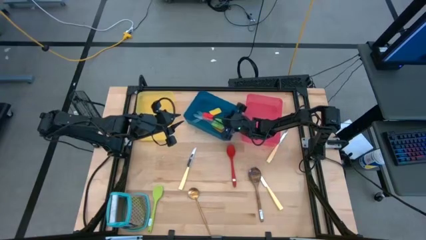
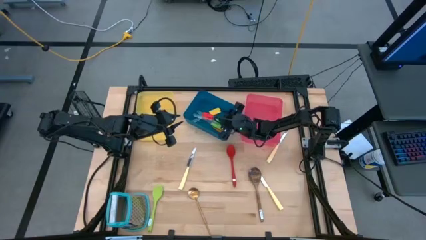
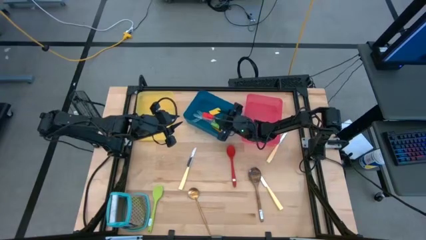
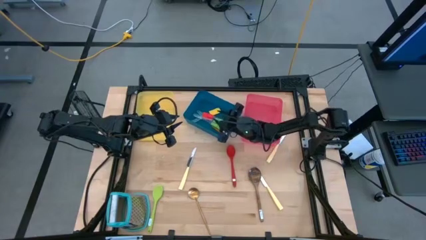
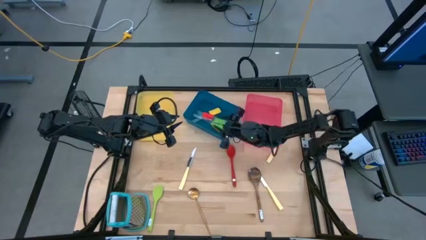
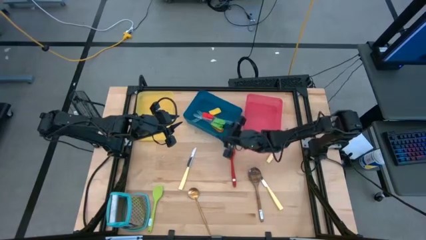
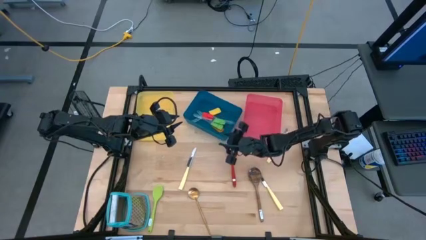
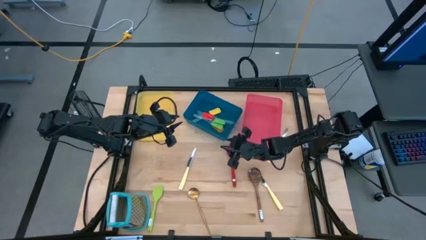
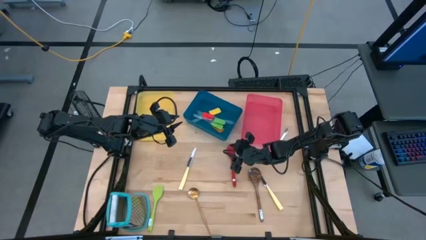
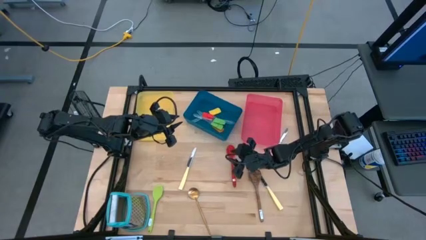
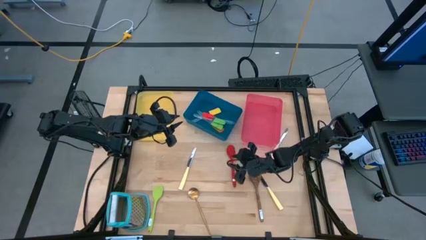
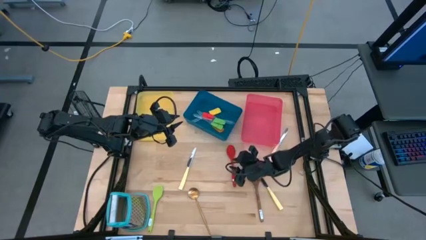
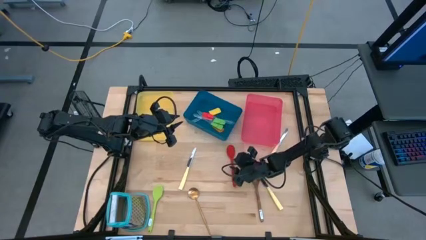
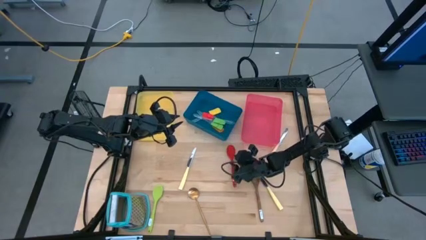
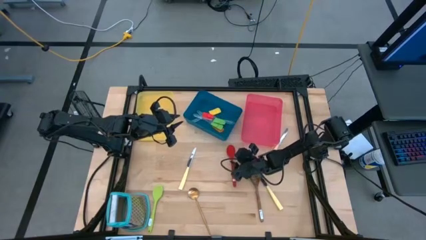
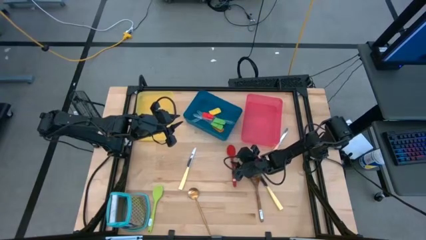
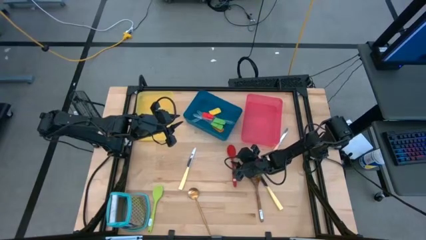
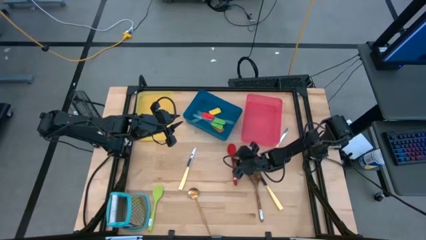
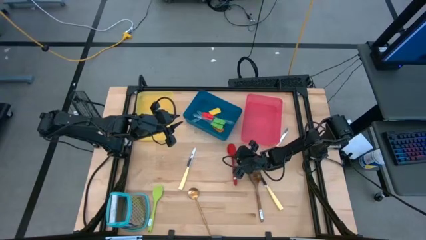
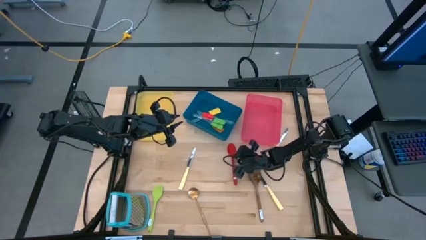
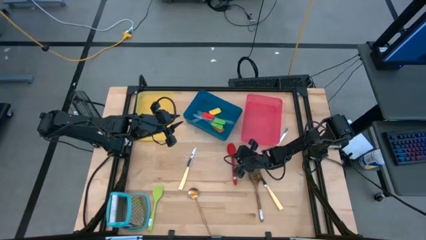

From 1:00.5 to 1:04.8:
Task: Pick & Place Kitchen Items
Put the red serving spoon into the pink bin

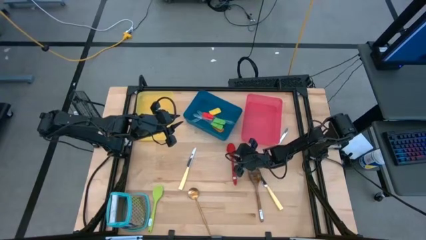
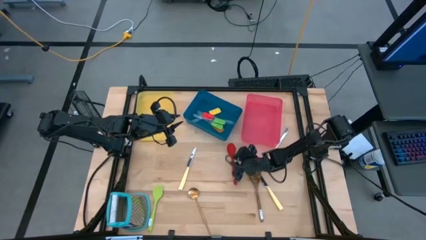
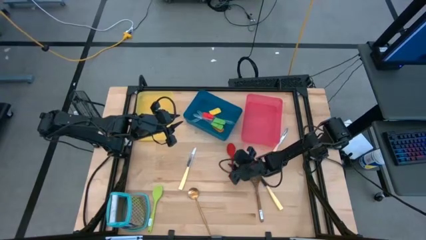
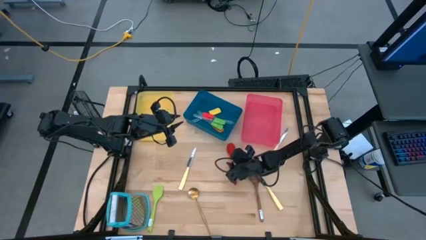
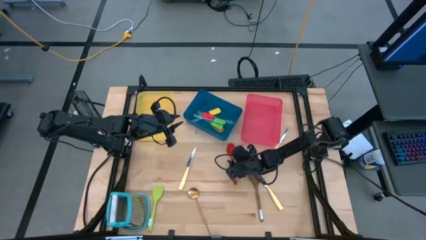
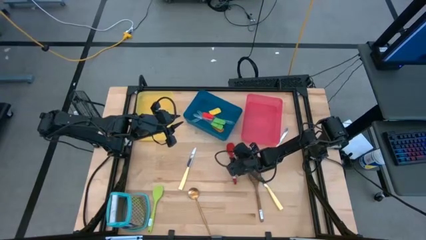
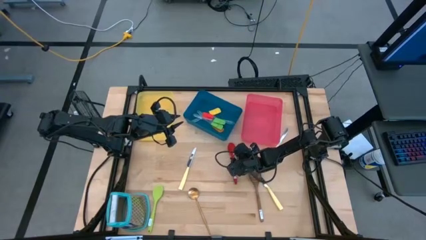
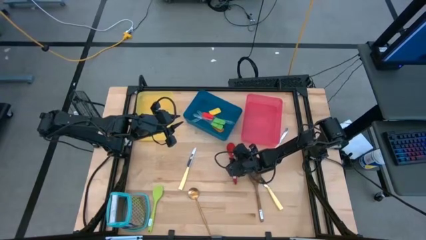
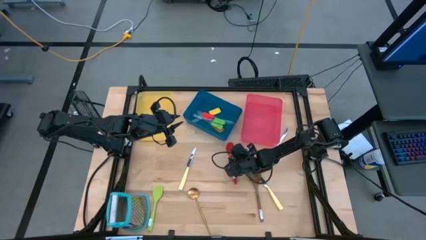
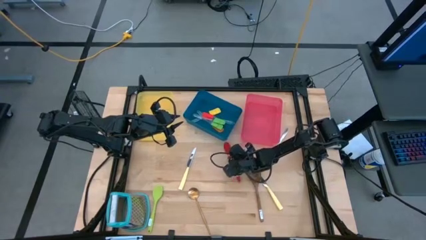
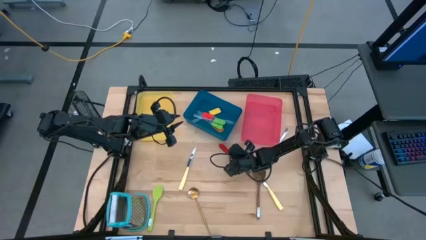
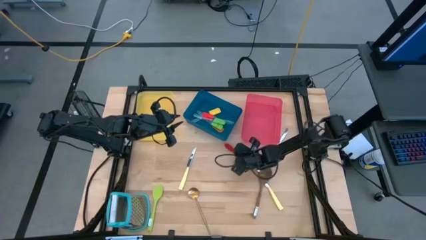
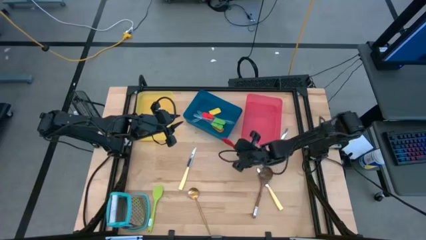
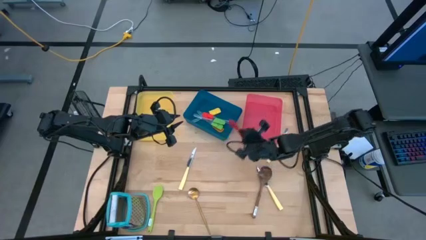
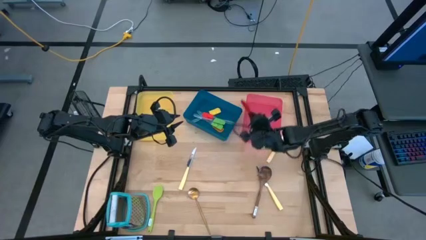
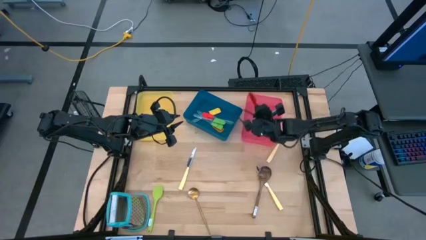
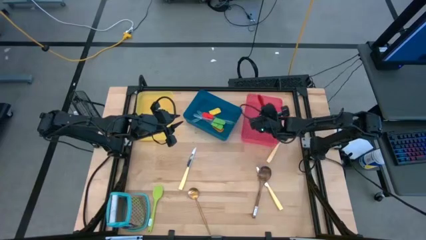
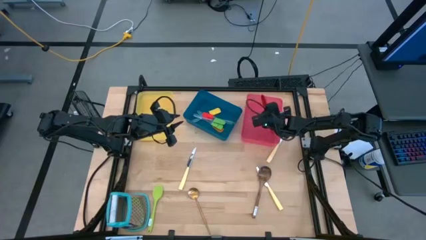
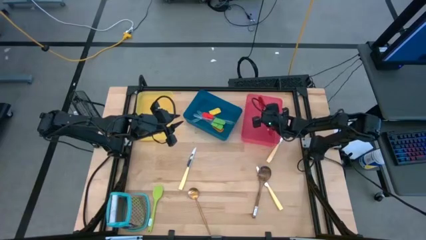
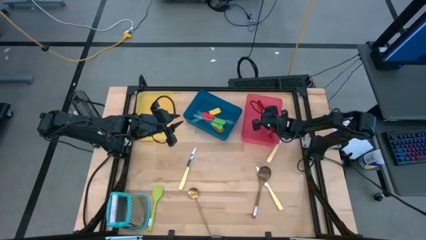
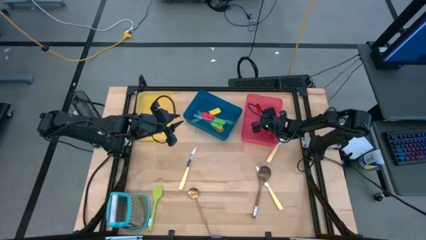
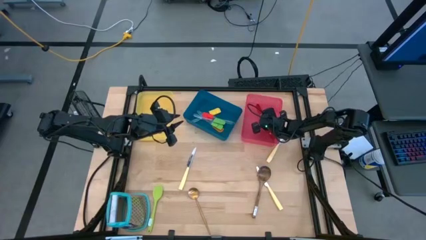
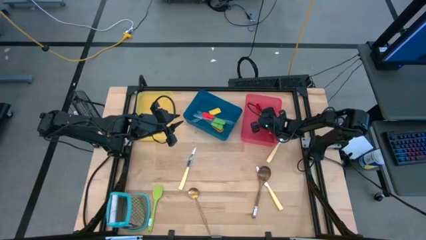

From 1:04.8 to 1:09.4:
Put the red serving spoon into the pink bin

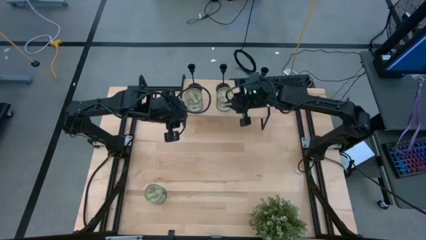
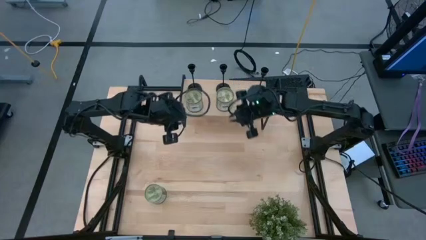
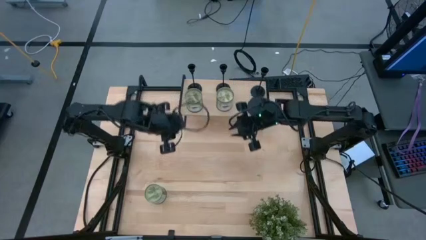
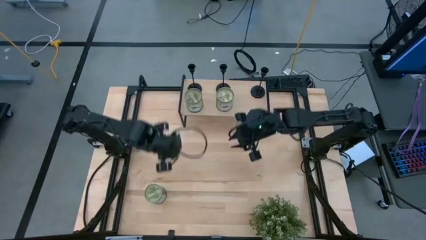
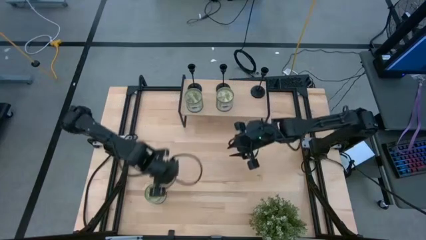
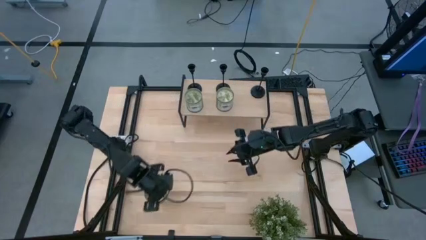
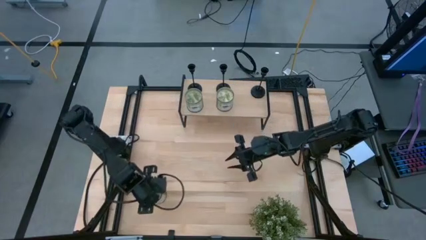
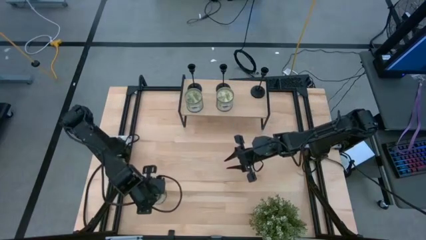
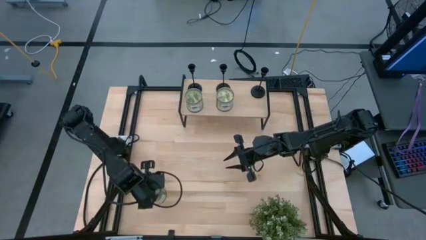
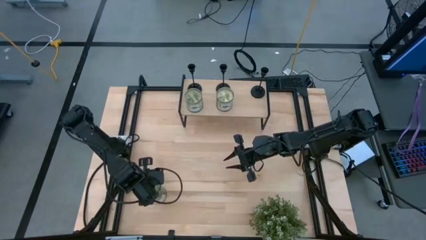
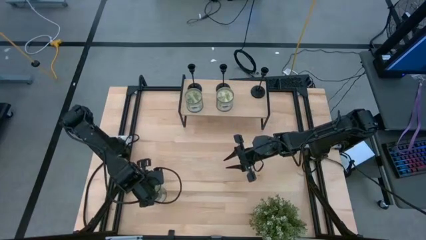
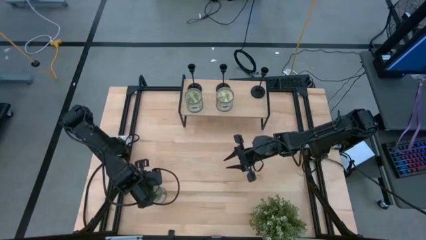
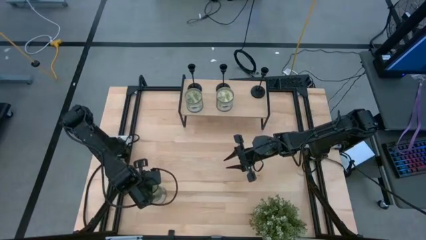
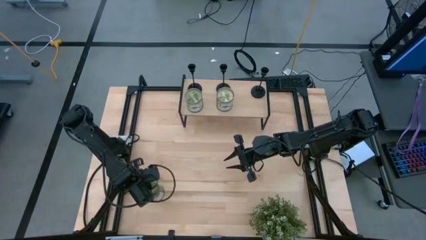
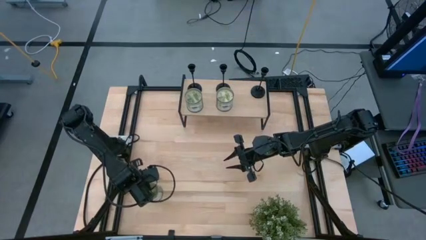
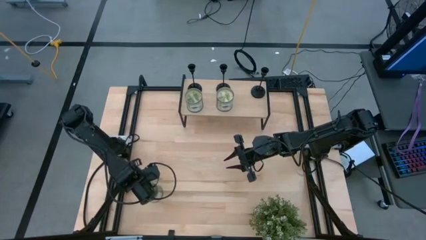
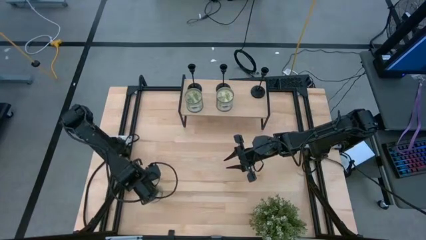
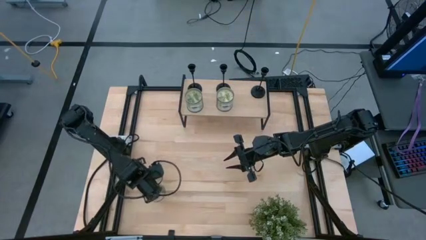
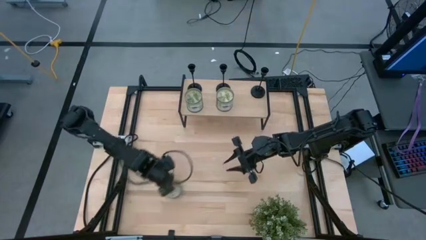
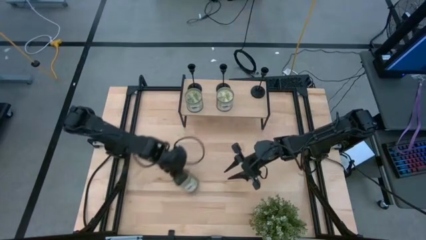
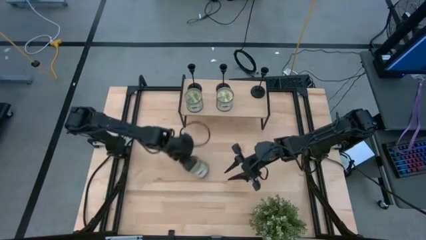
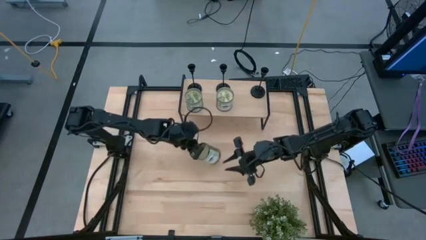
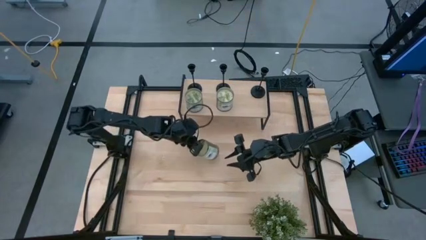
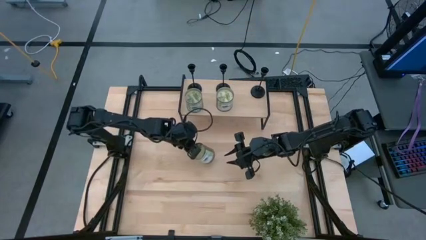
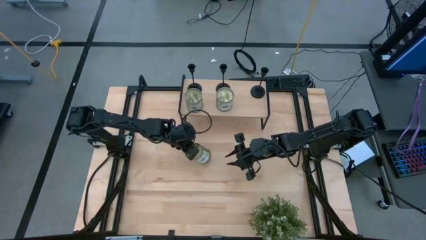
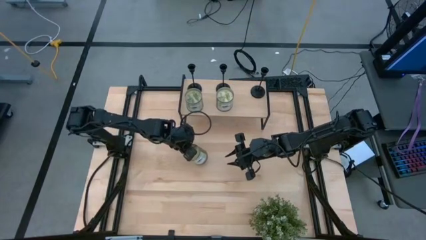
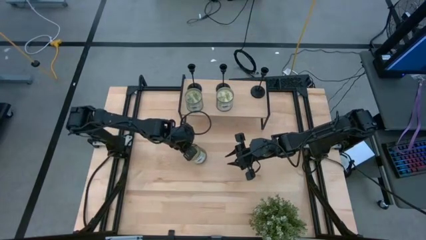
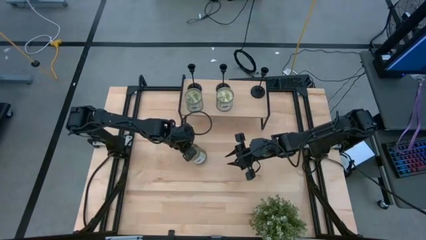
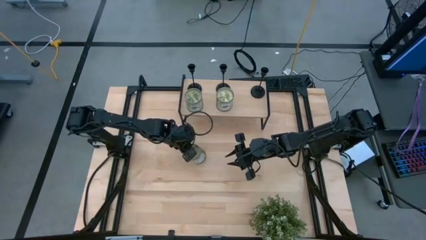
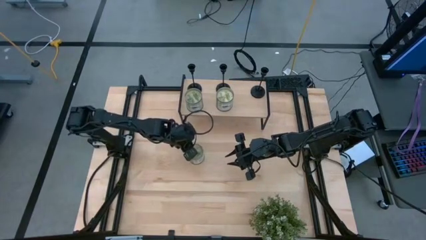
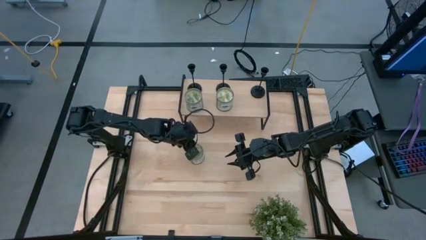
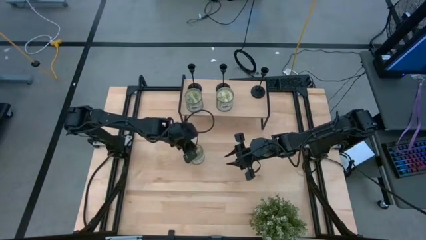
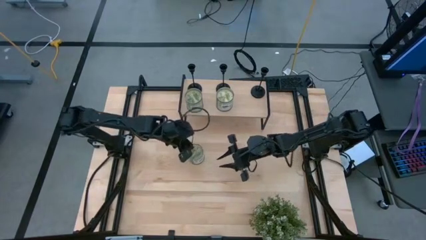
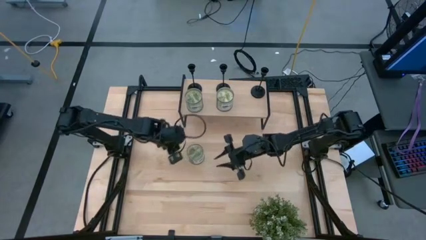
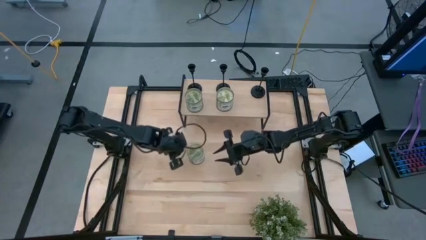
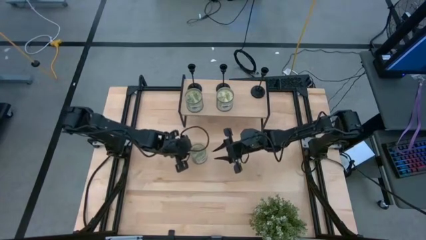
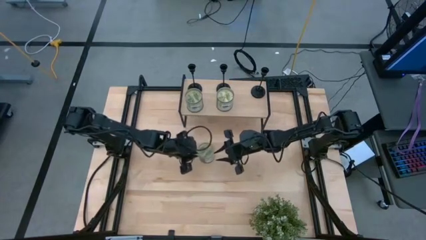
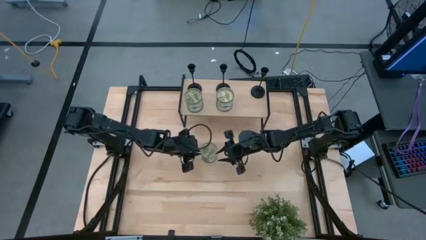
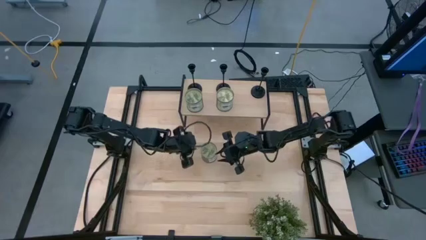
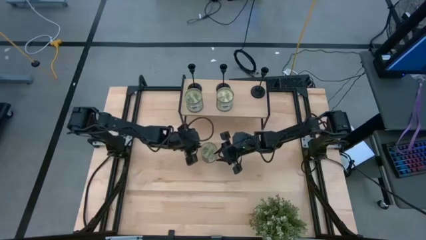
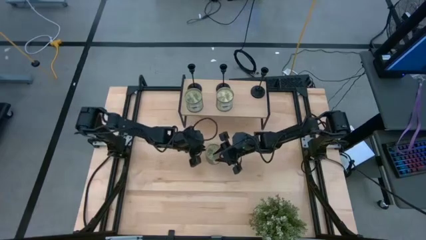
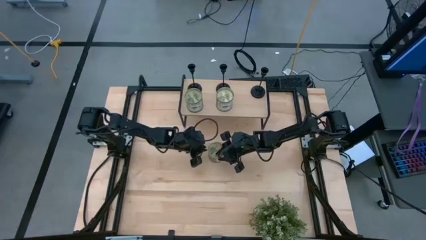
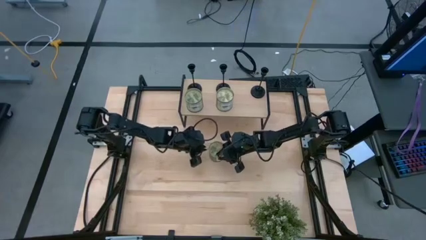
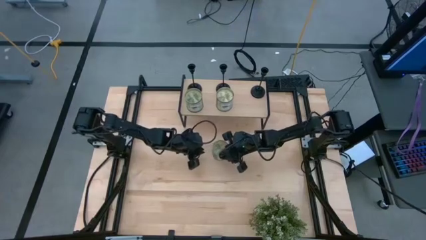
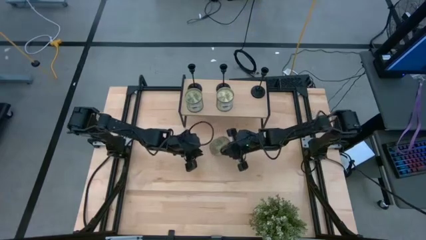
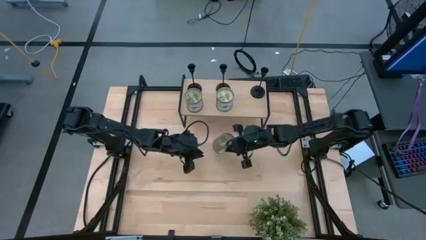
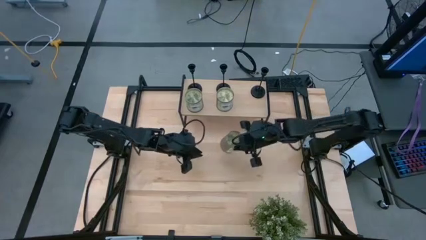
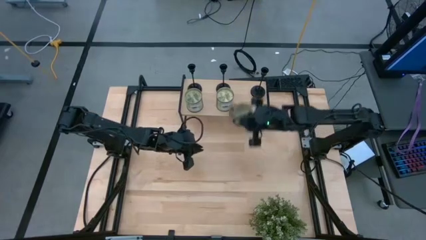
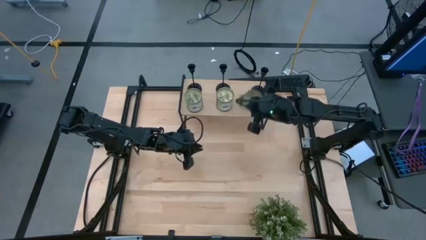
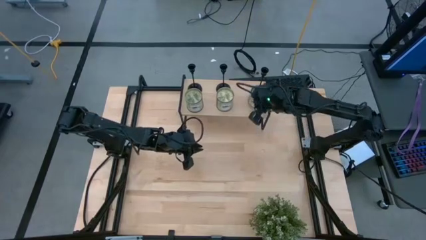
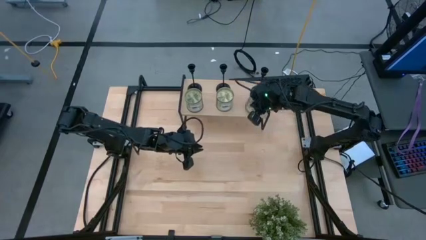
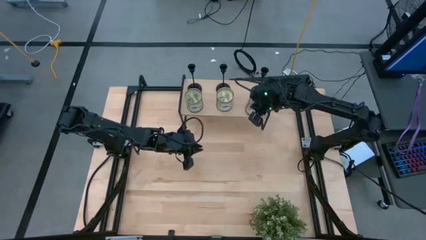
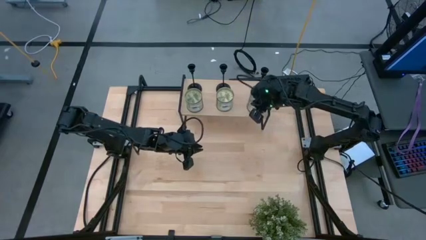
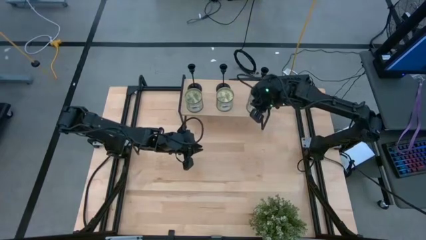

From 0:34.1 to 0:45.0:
Task: Pick & Place candle stick holders
Put the scented candle on the shelf
